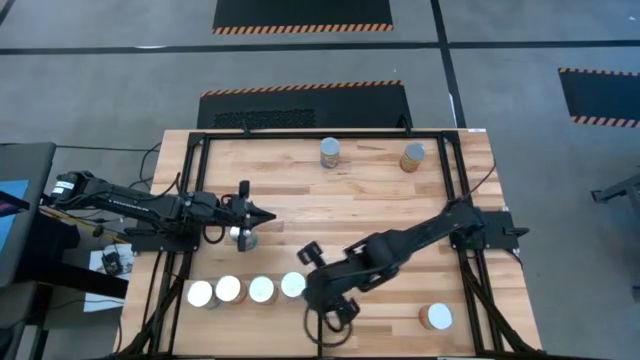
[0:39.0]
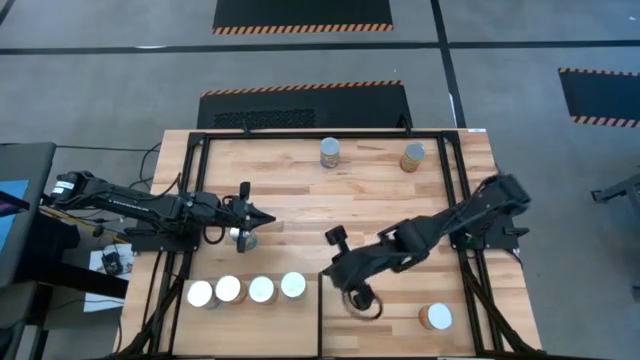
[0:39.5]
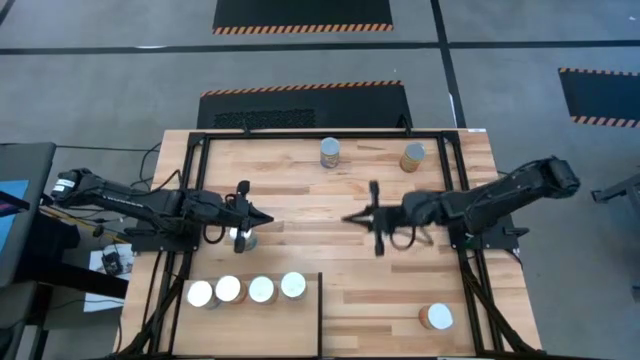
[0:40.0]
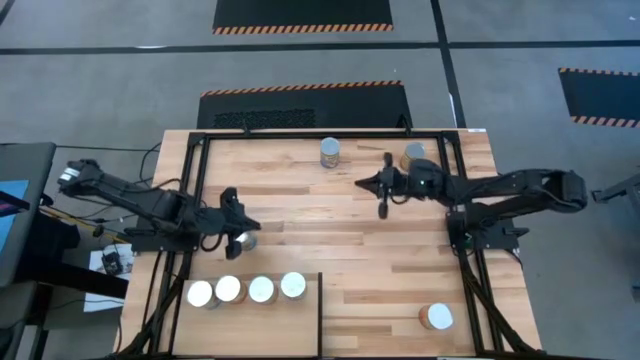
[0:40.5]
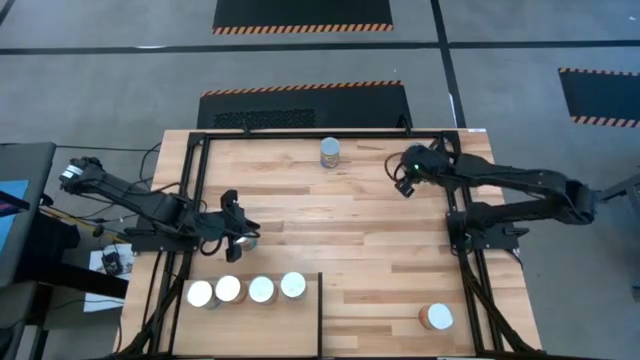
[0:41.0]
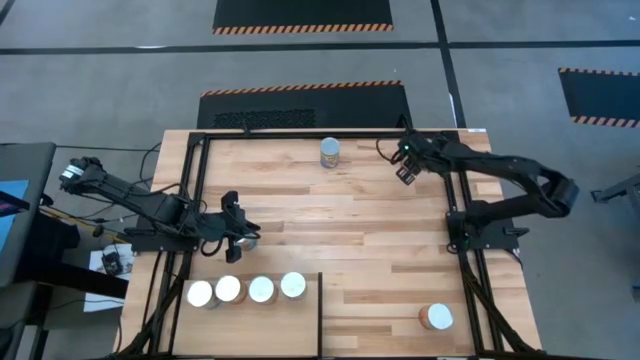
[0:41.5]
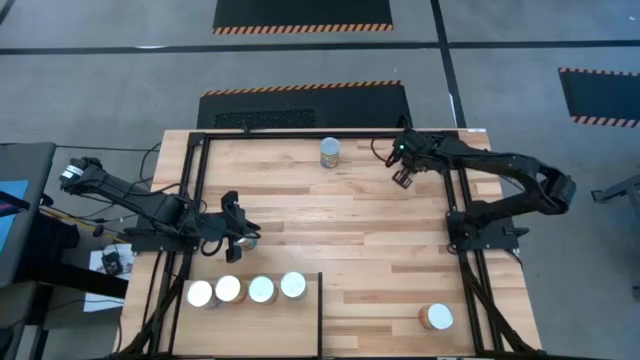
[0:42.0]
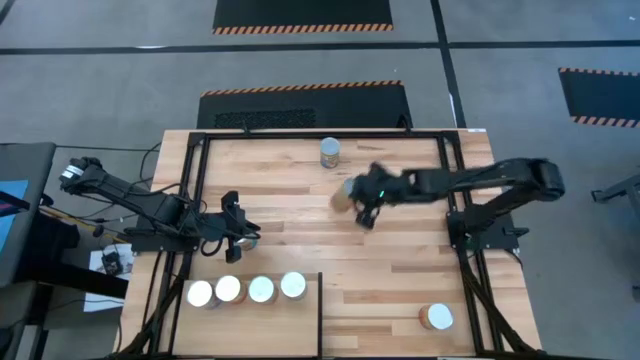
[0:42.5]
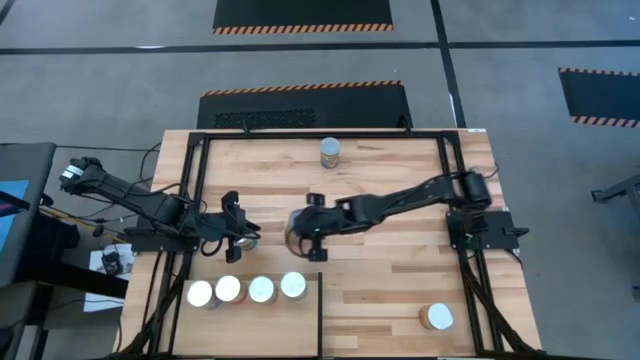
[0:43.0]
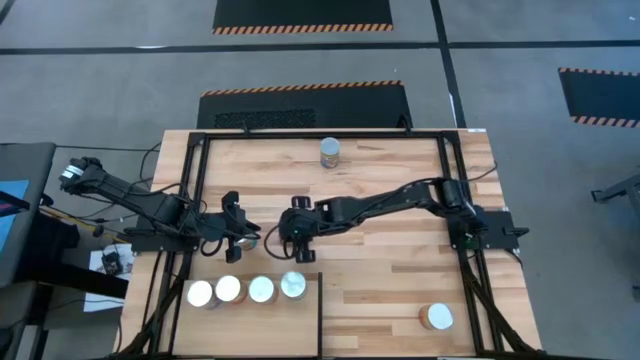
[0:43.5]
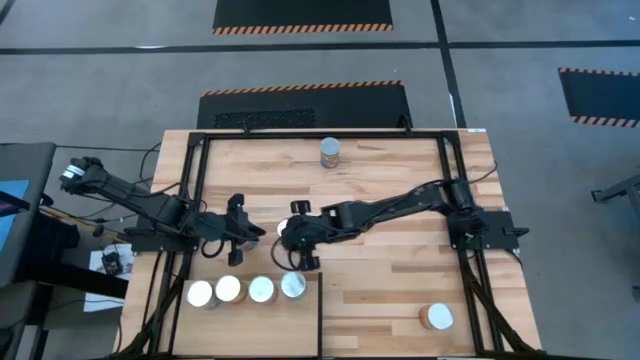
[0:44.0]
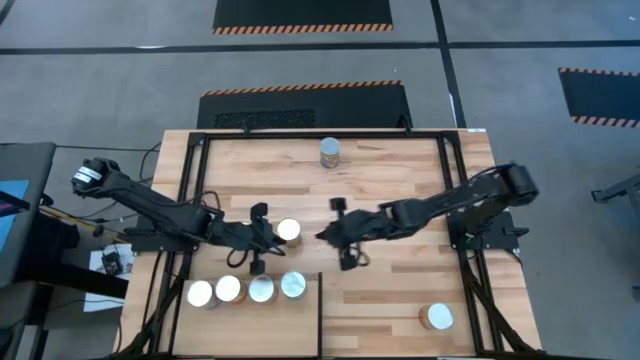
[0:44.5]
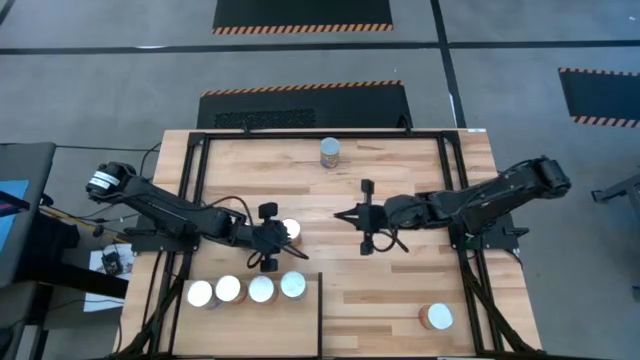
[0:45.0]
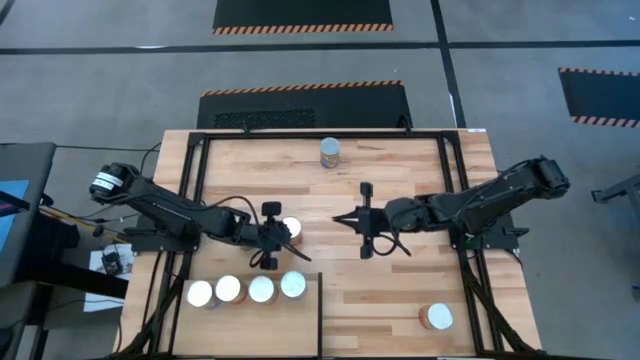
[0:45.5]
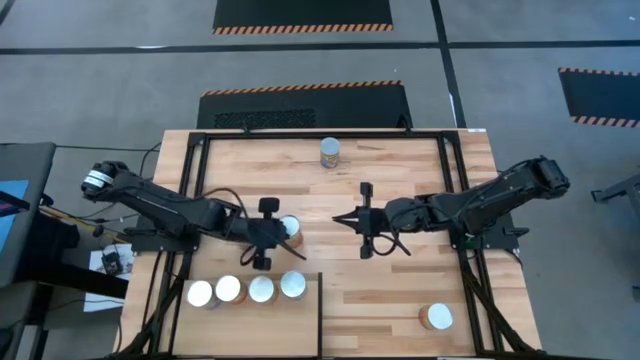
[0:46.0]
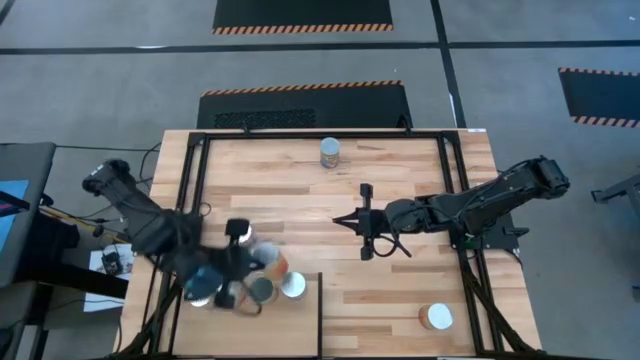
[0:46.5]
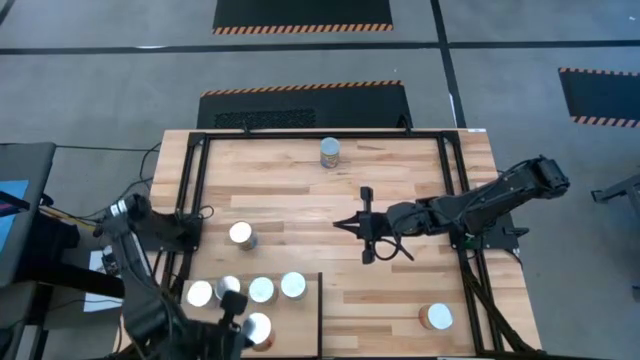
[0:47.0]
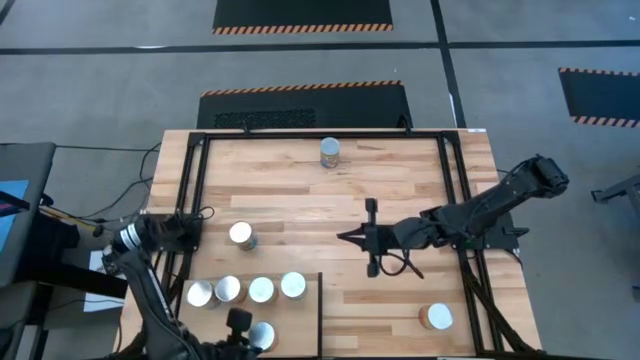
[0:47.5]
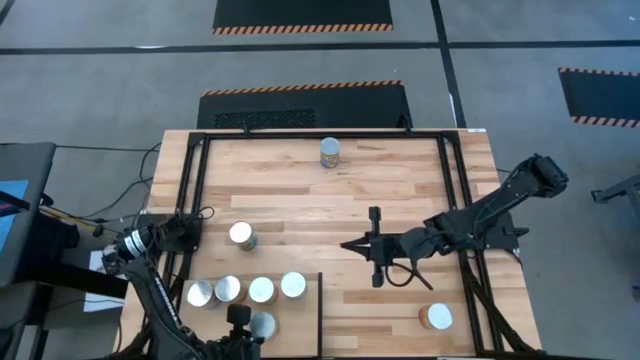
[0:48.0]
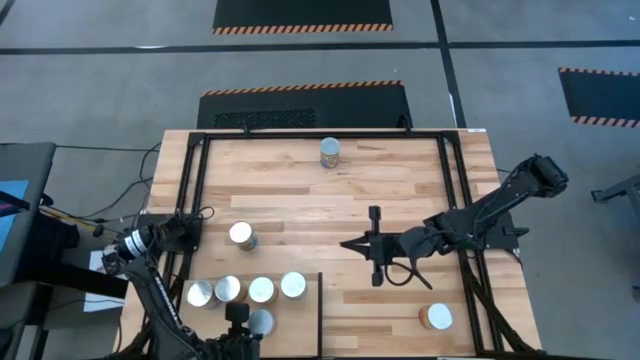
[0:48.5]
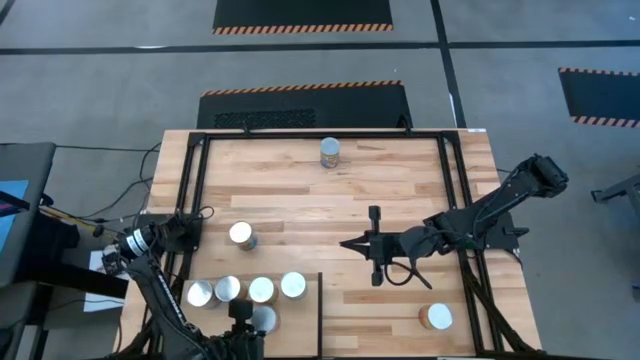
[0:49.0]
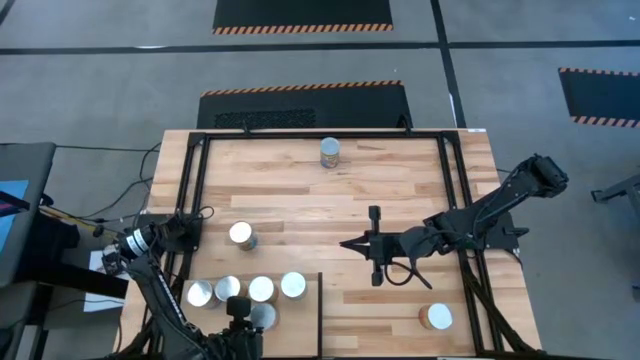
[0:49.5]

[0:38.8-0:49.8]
Task: Pick and place cans onto a shelf
Put the canned green beans on the shelf

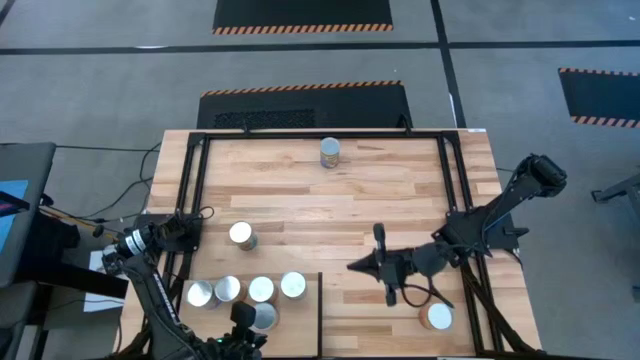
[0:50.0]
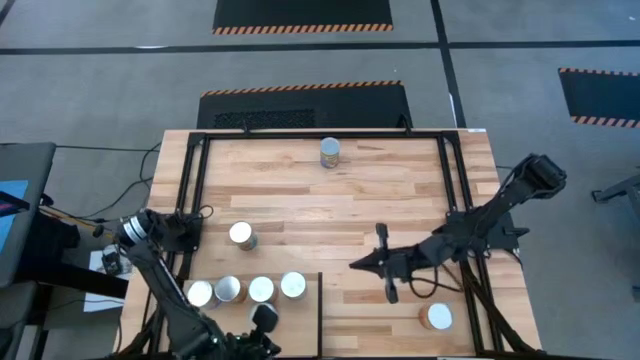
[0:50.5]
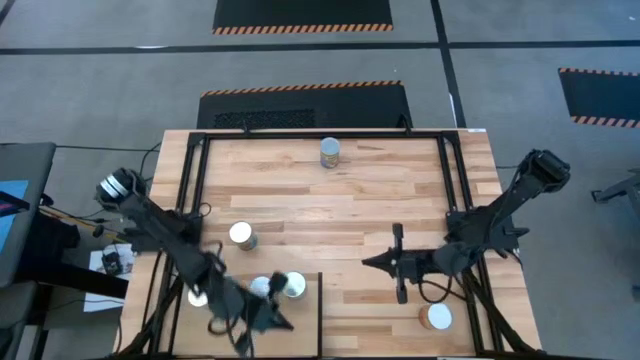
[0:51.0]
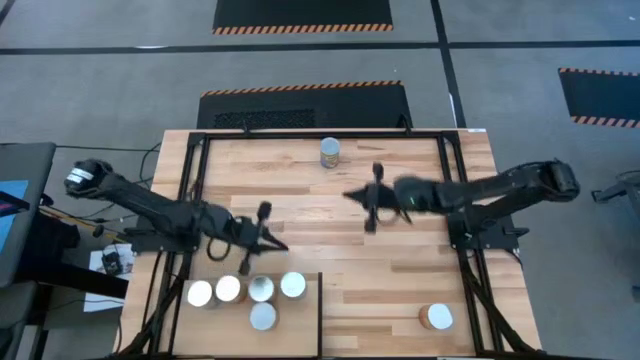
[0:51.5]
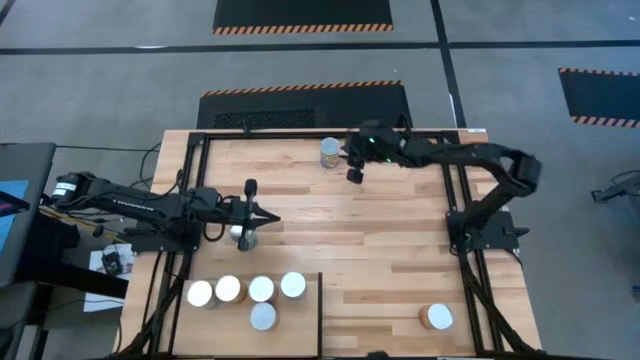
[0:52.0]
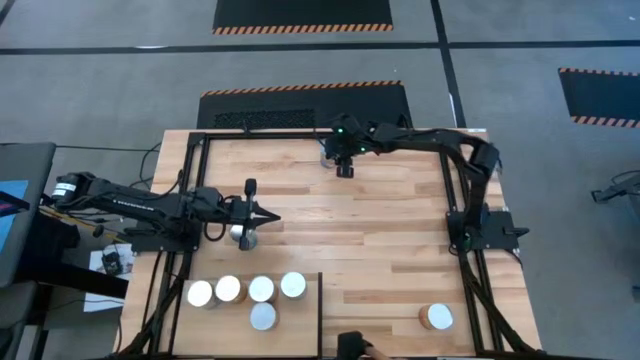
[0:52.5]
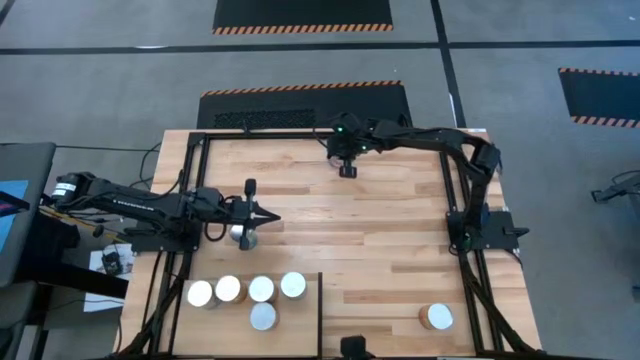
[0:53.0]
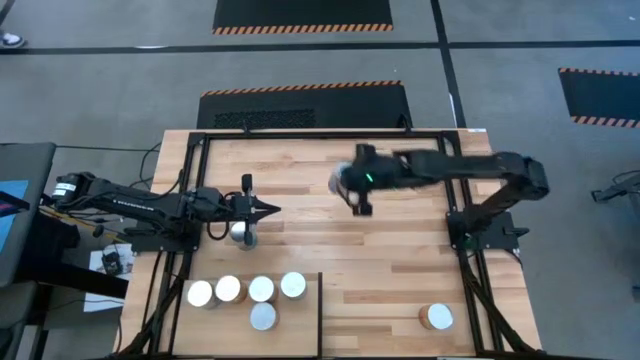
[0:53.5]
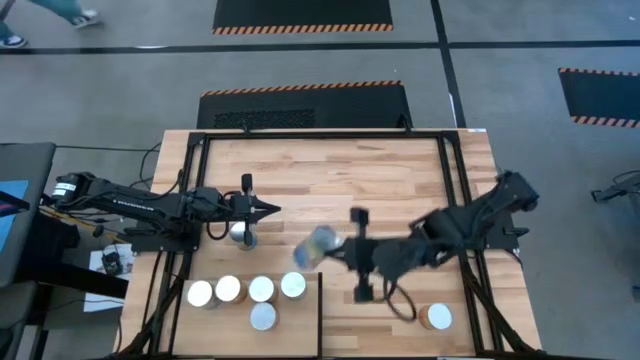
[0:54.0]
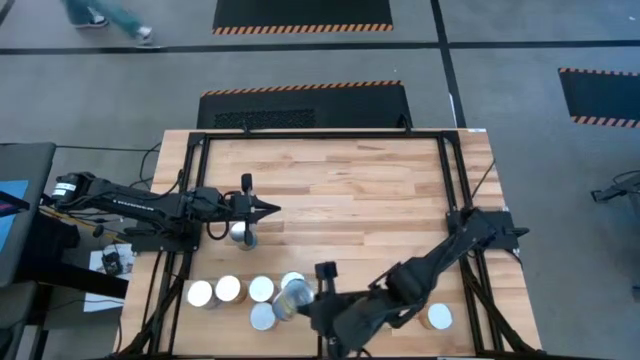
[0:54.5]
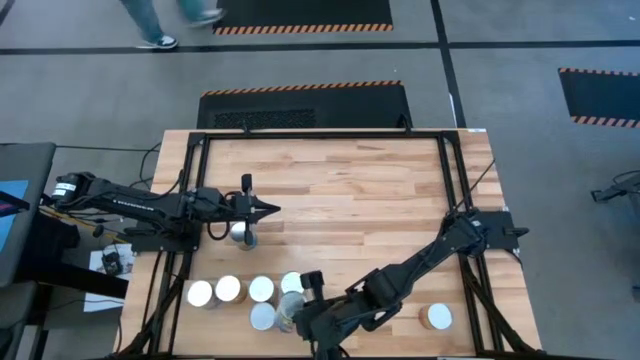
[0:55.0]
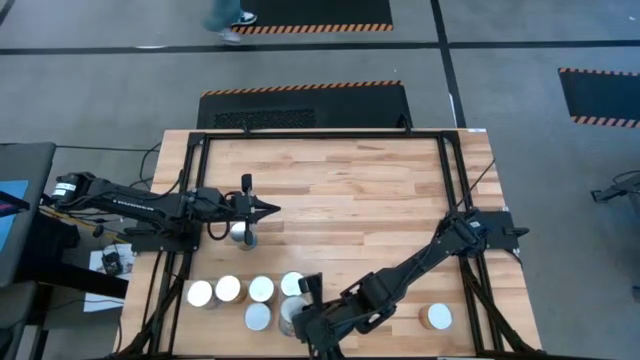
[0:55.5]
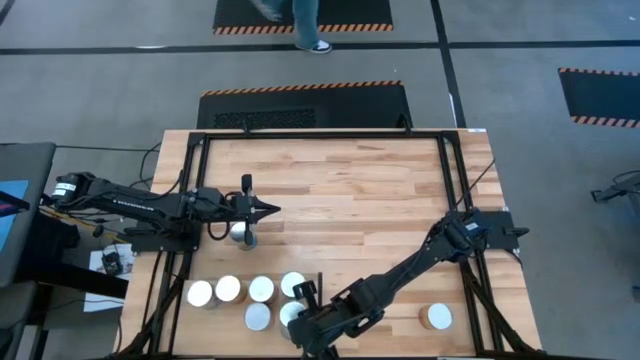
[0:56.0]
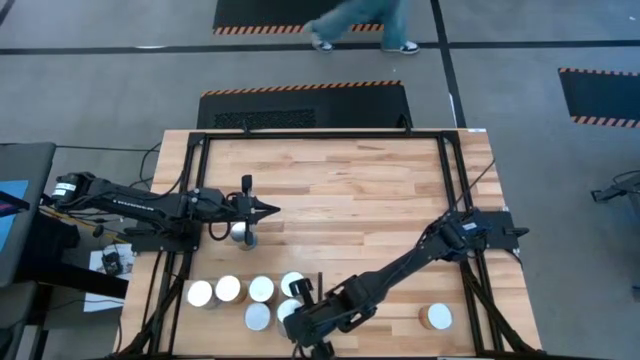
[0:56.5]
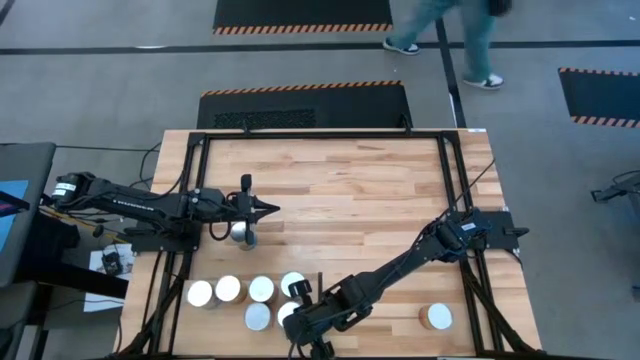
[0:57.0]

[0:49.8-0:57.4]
Put the top canned peaches on the shelf

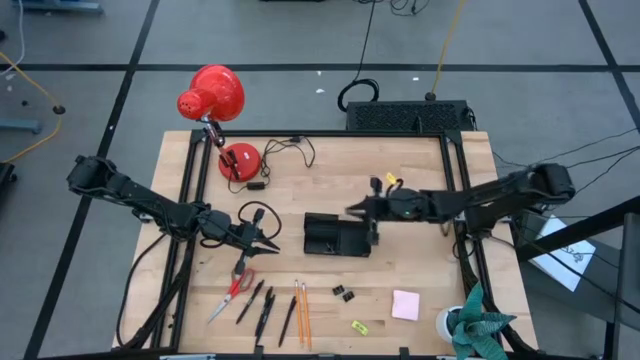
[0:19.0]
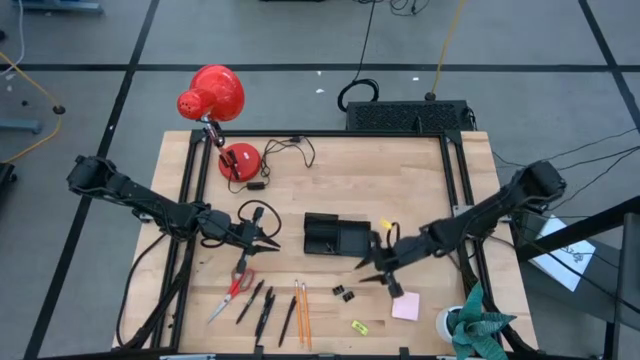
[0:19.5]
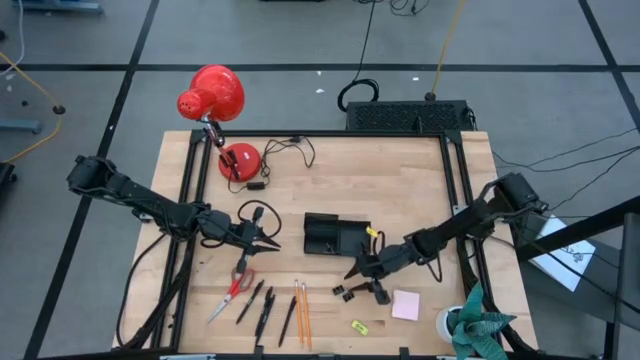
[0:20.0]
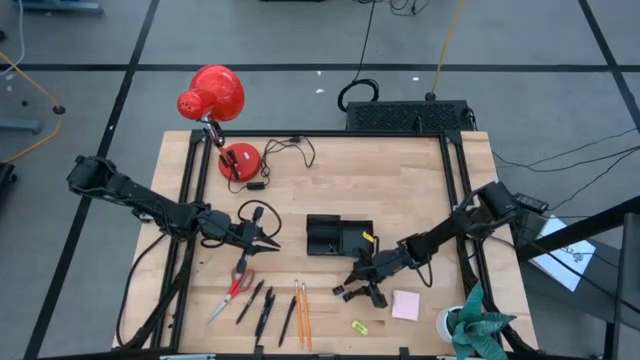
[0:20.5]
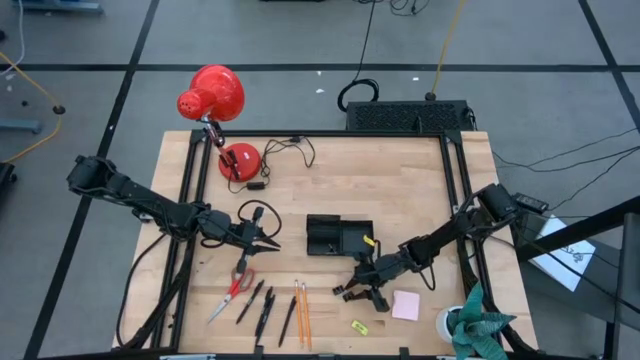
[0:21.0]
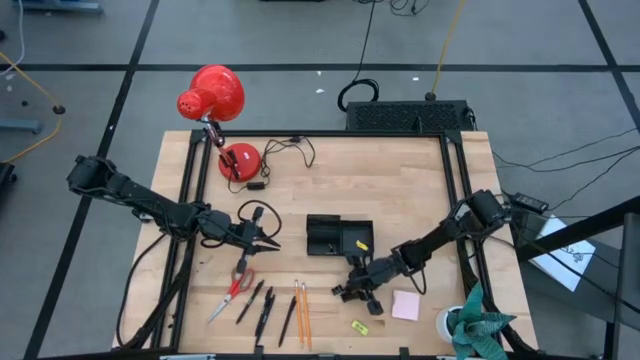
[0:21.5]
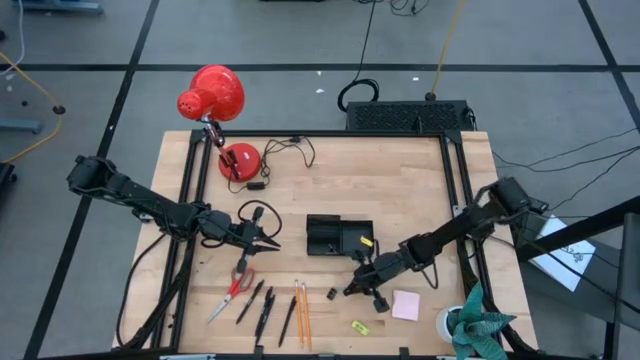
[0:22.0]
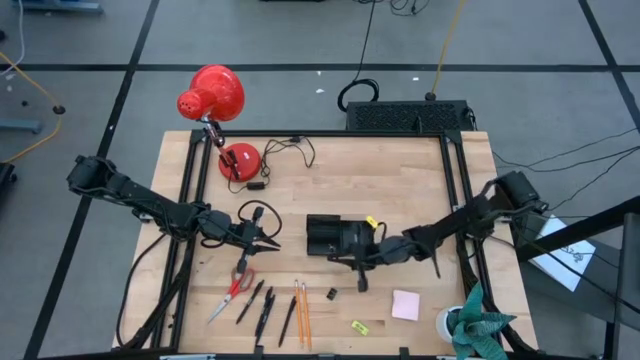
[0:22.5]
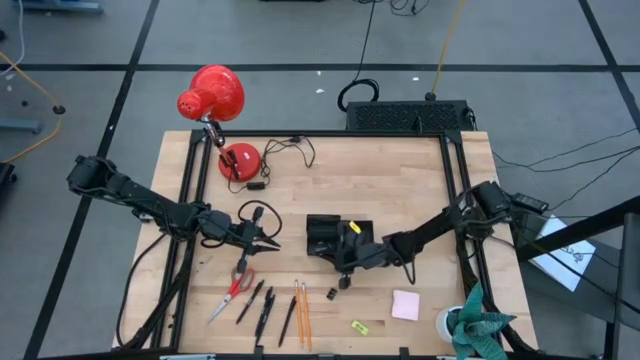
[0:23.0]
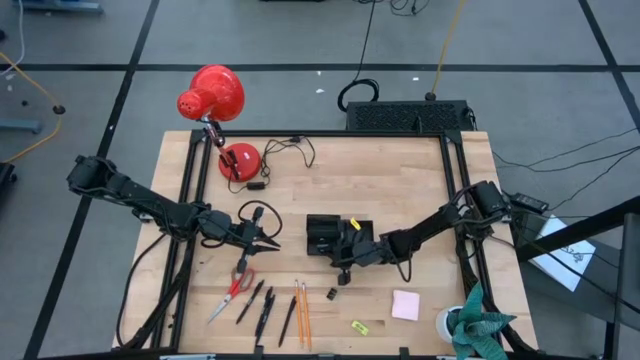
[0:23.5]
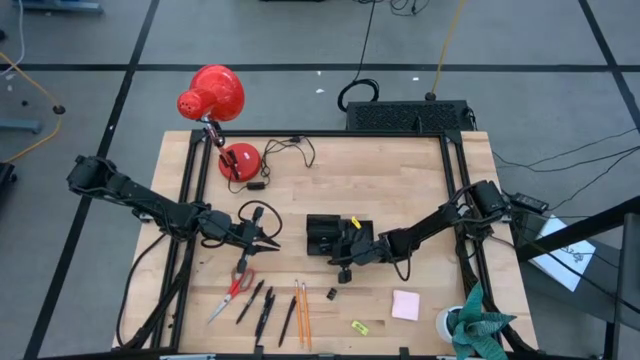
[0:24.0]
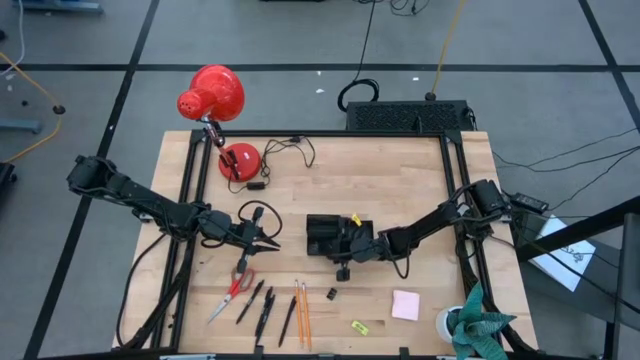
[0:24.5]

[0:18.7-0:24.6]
Task: Pick and place office supplies into organizer
Put the black binder clip into the black desk organizer
